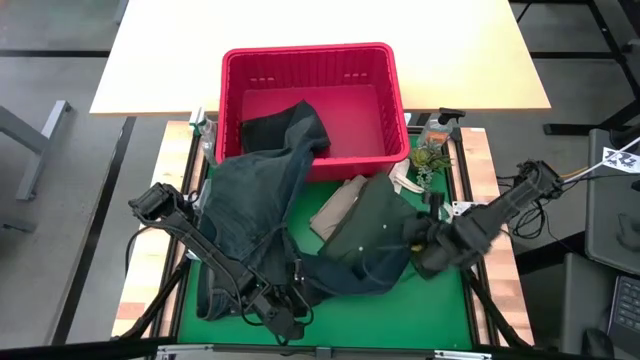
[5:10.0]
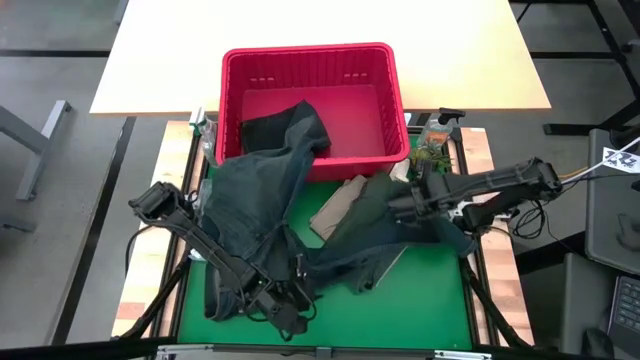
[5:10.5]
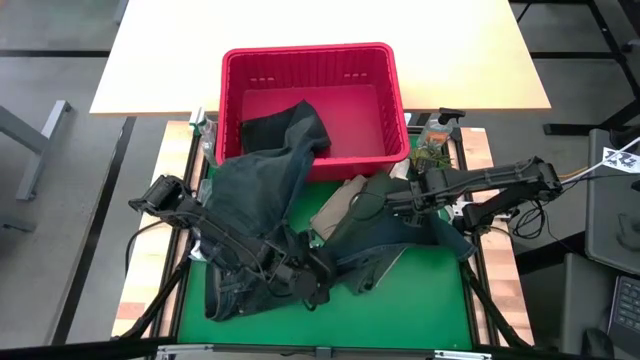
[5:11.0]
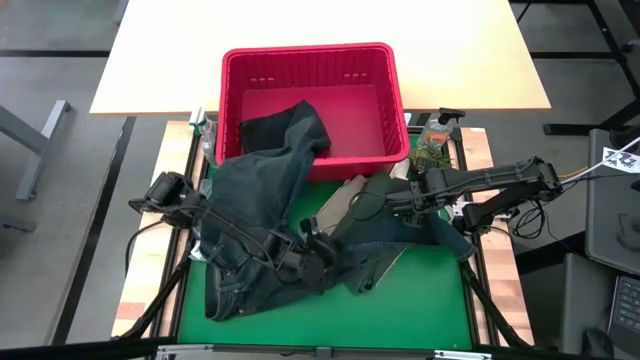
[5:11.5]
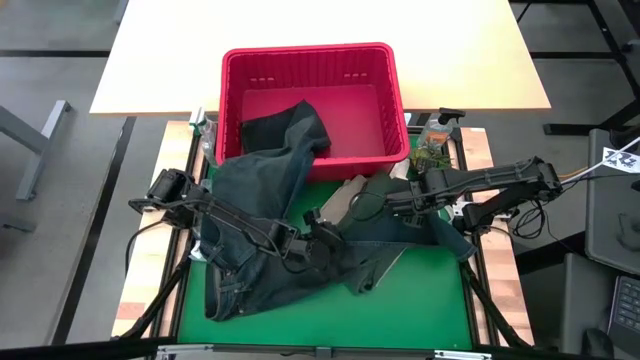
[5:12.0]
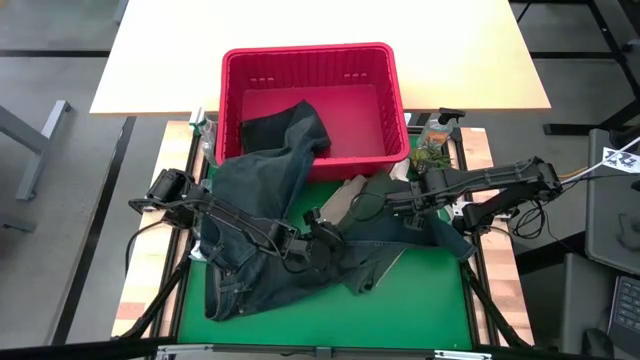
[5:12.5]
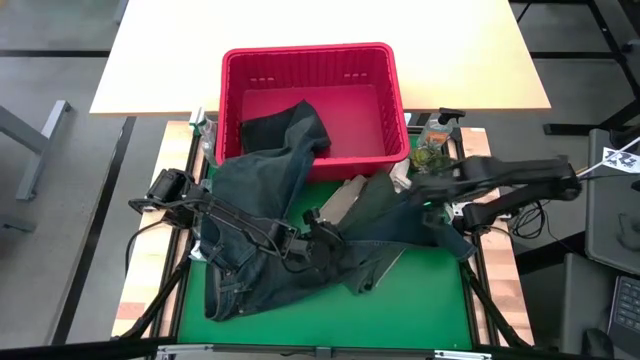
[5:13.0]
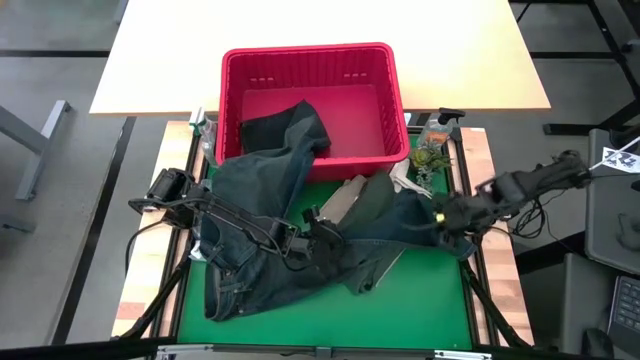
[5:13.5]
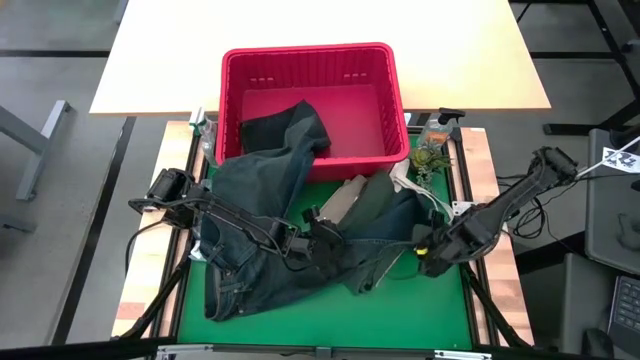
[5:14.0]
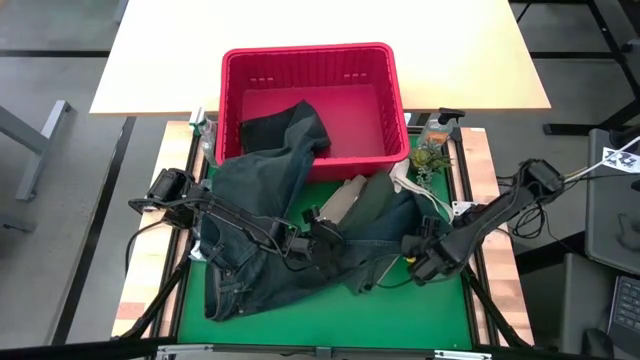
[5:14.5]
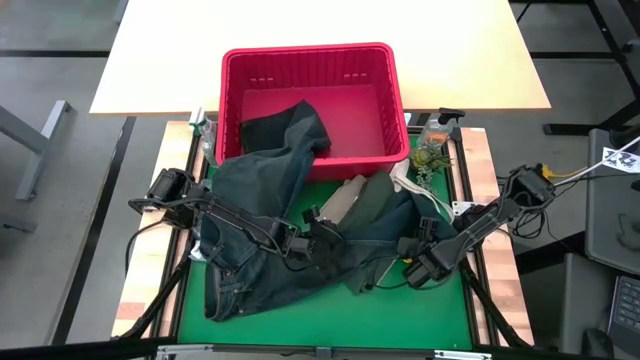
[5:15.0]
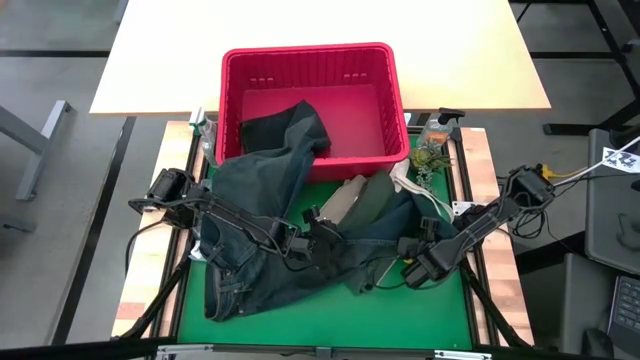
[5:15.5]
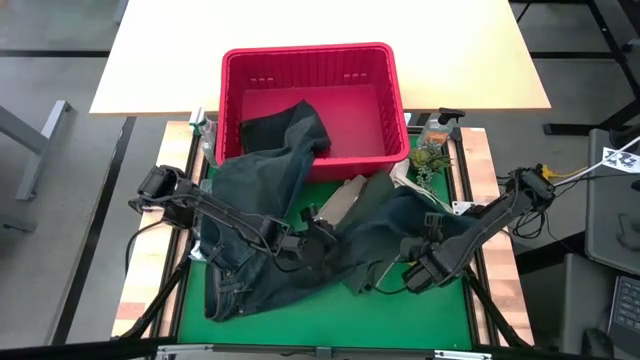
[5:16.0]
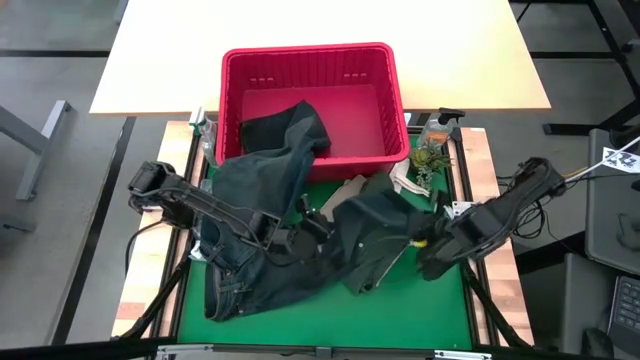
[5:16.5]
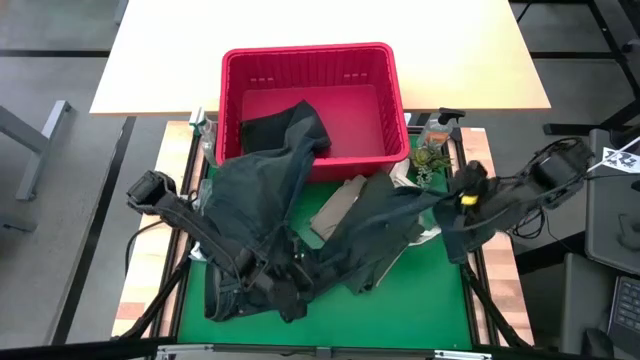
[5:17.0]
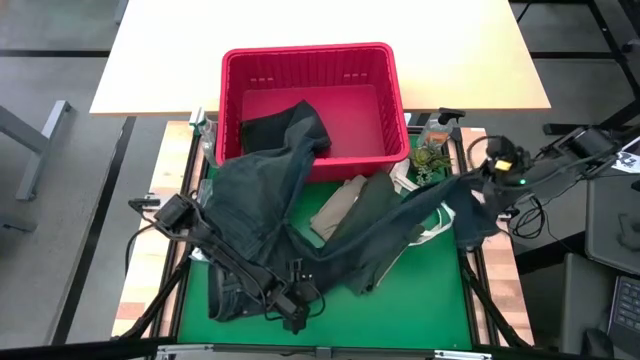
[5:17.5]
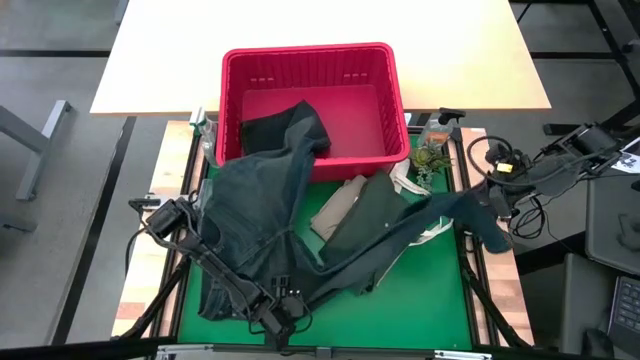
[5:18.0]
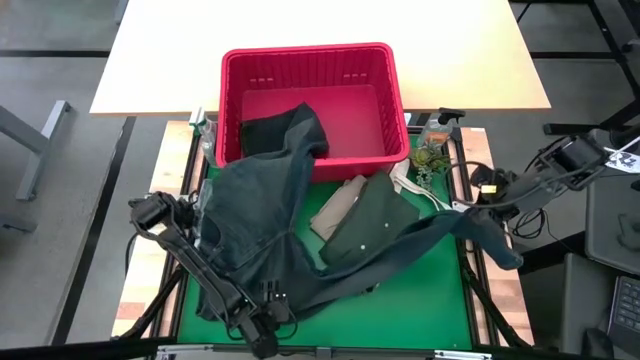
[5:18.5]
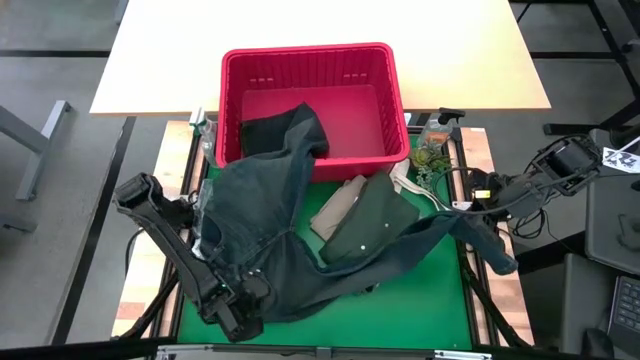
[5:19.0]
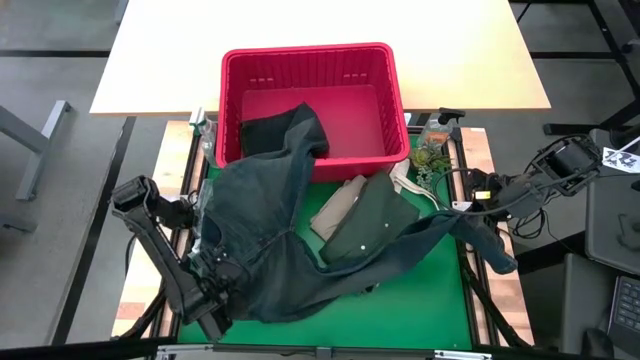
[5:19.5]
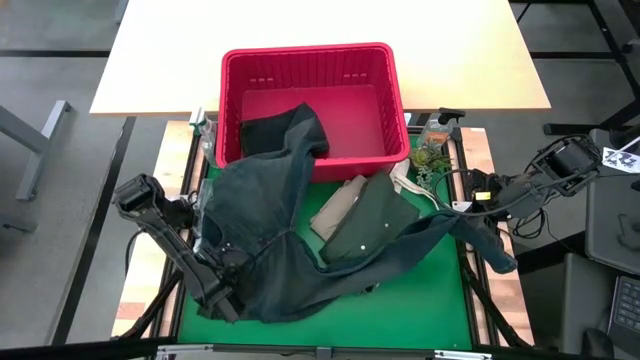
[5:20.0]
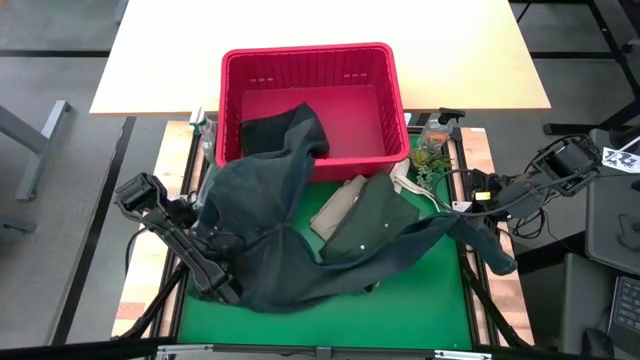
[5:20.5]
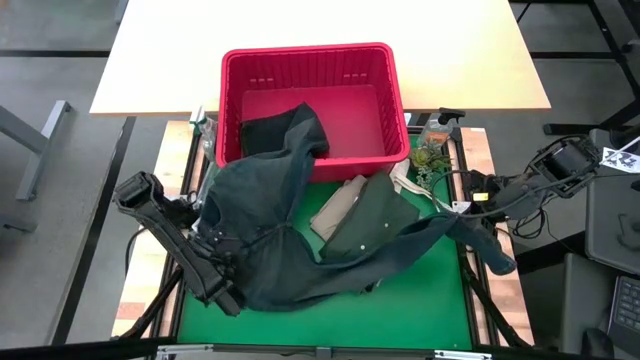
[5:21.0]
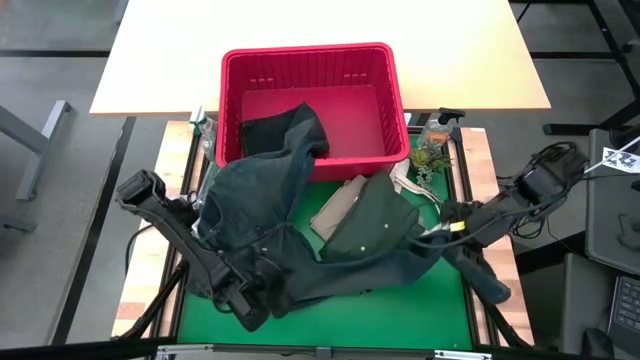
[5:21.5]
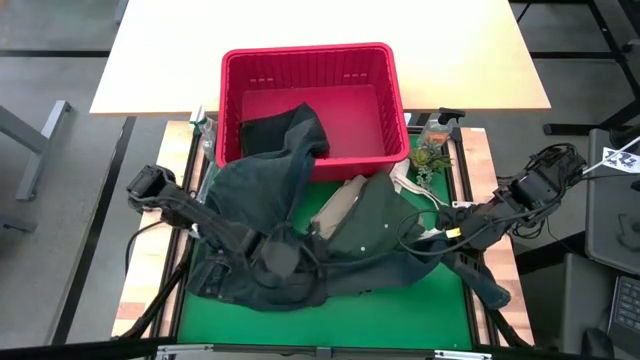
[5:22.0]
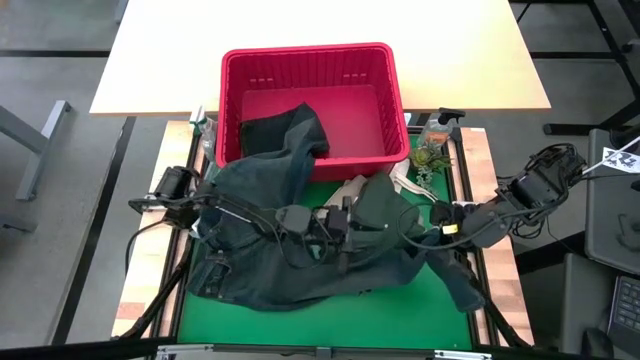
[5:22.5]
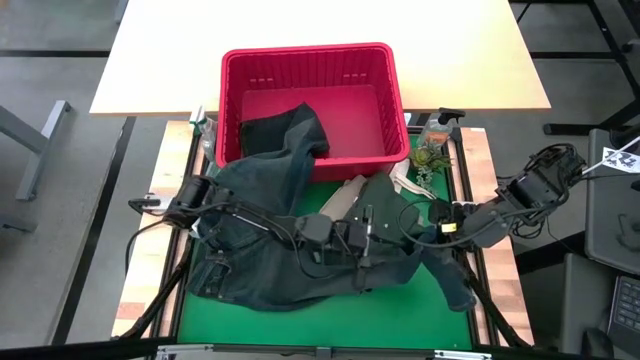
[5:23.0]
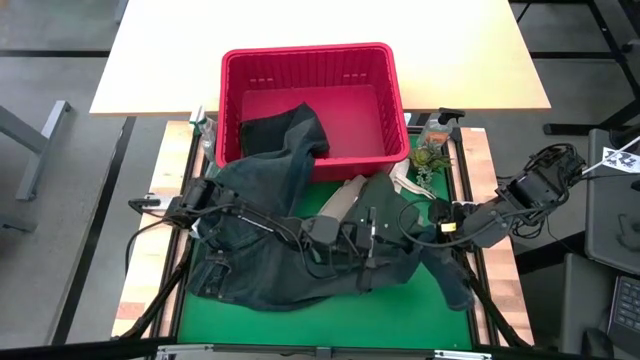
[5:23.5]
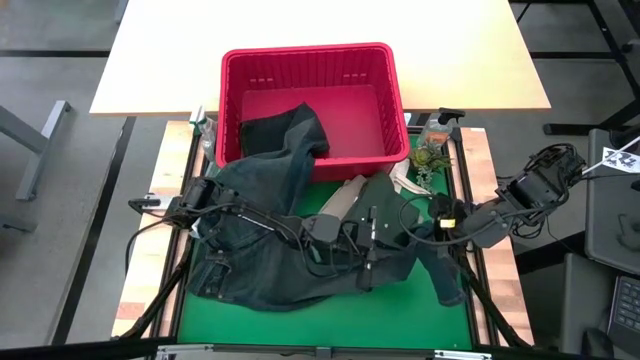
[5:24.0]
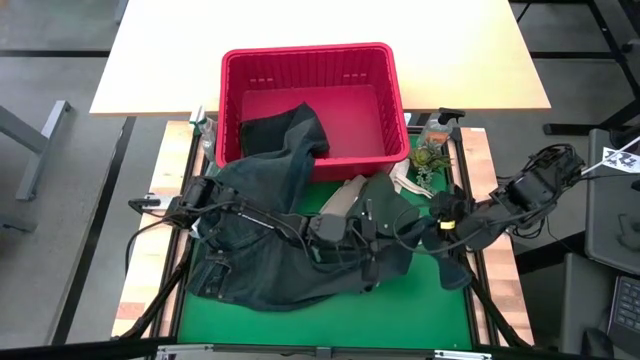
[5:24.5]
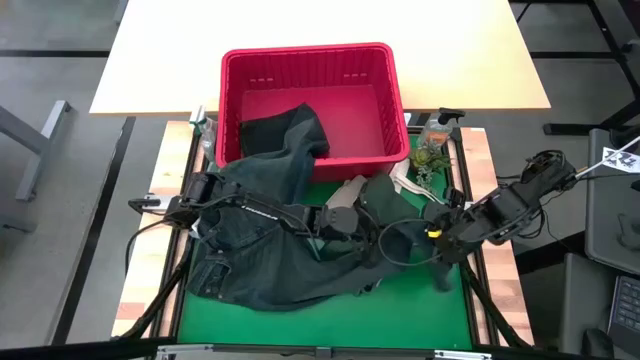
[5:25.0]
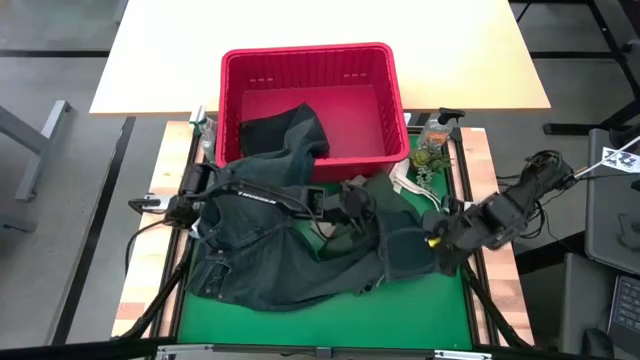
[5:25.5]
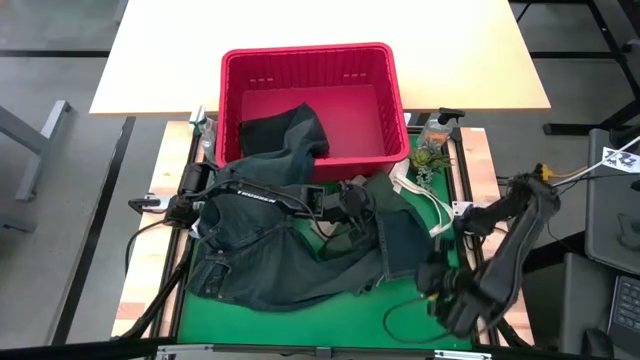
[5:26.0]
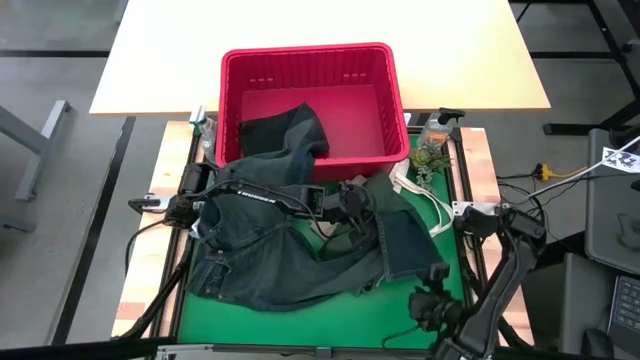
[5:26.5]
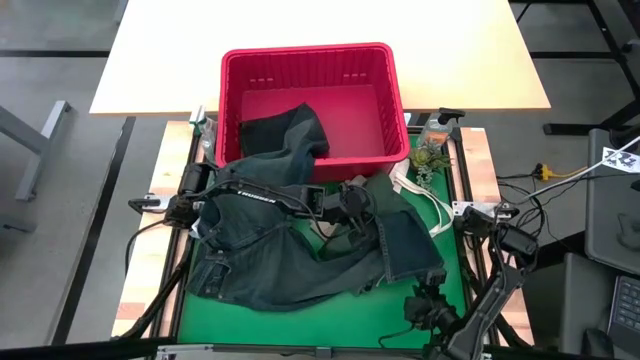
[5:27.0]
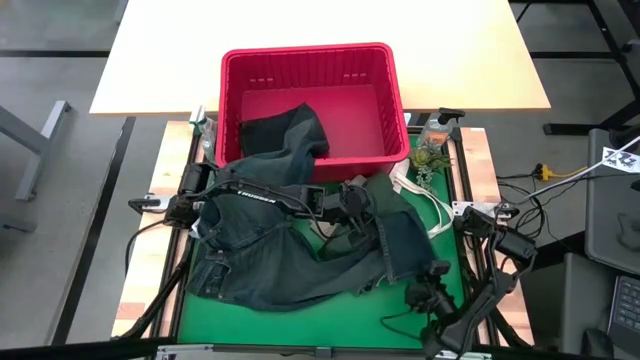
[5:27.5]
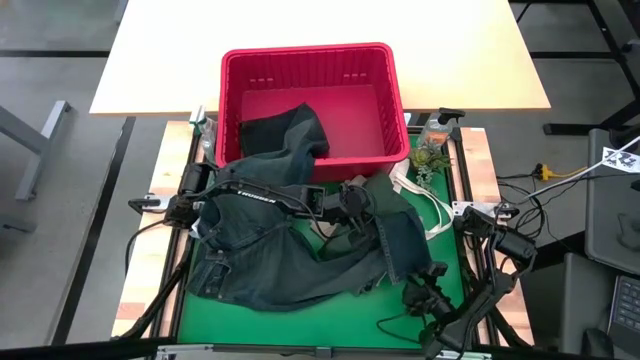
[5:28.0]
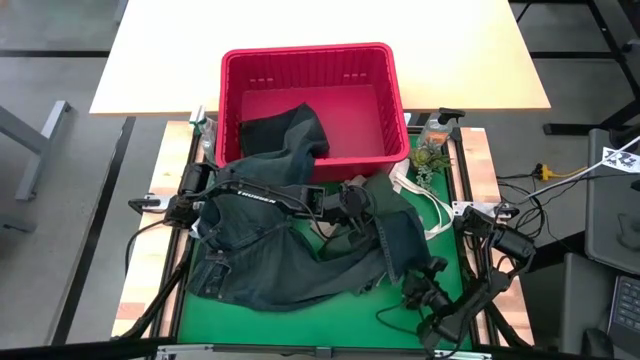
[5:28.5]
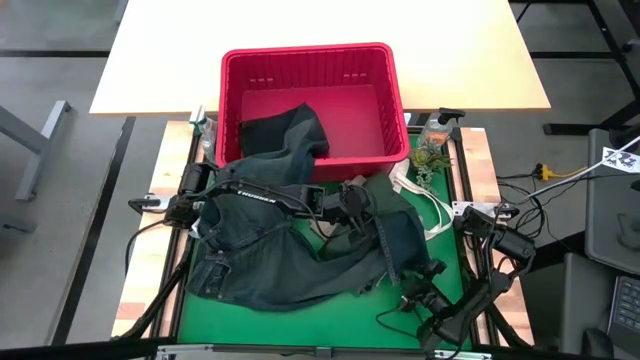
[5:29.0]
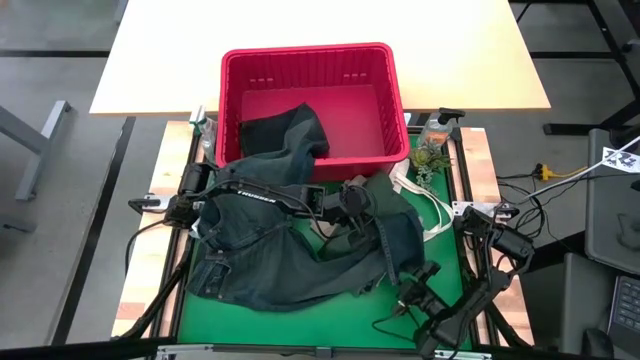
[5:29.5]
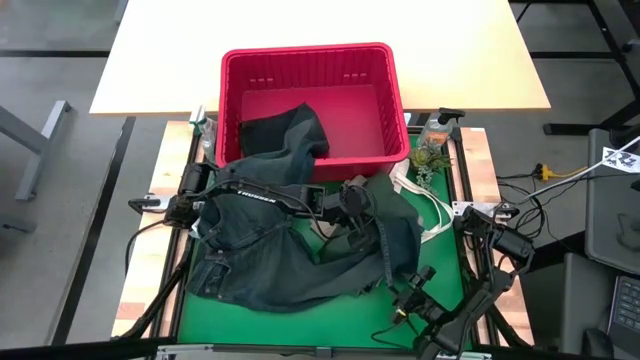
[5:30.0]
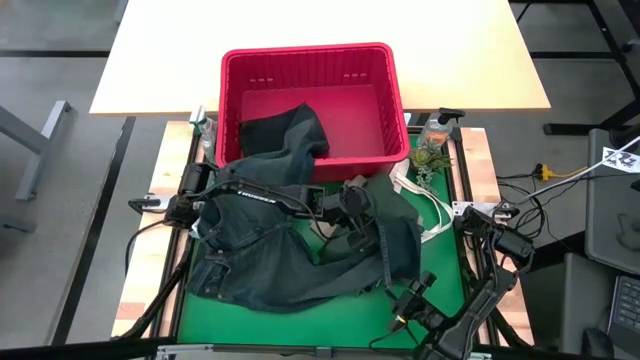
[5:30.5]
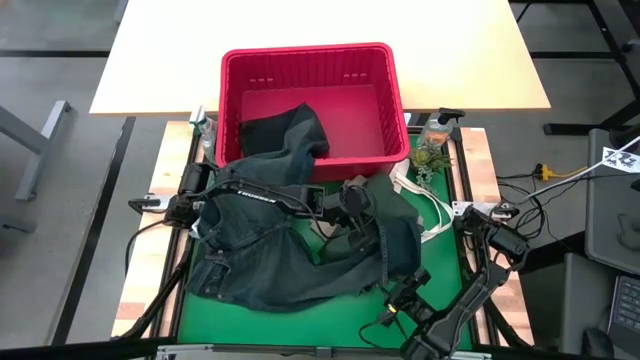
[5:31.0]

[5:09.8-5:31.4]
Task: Fold laundry
Fold the dark blue pants
